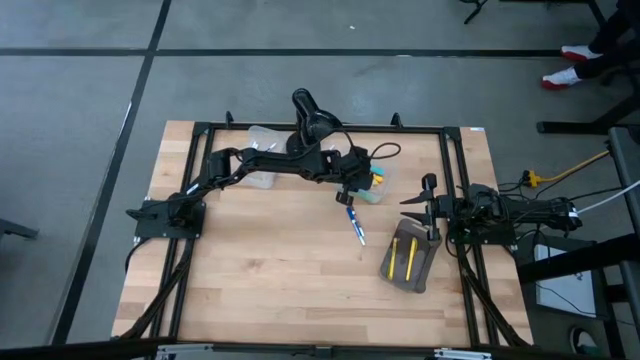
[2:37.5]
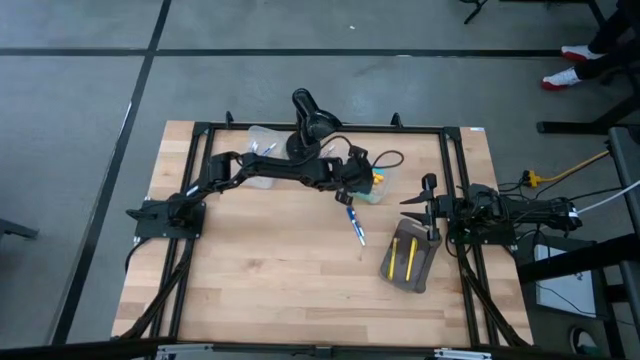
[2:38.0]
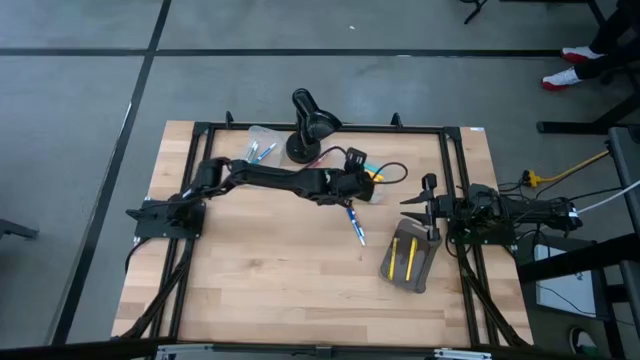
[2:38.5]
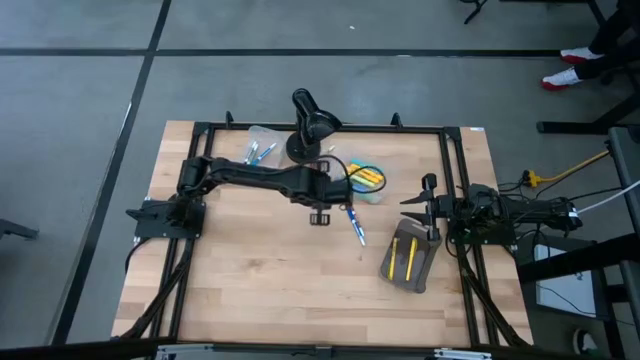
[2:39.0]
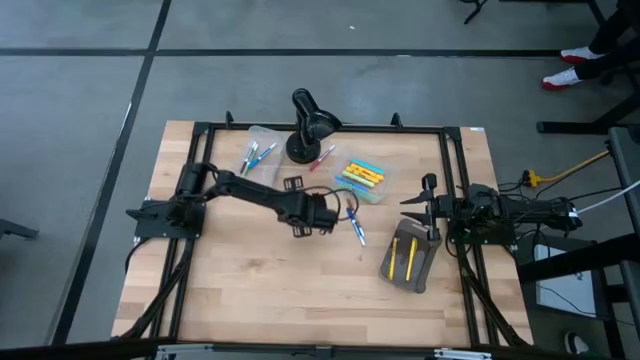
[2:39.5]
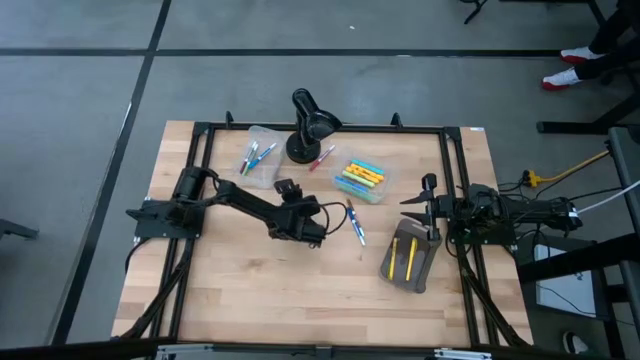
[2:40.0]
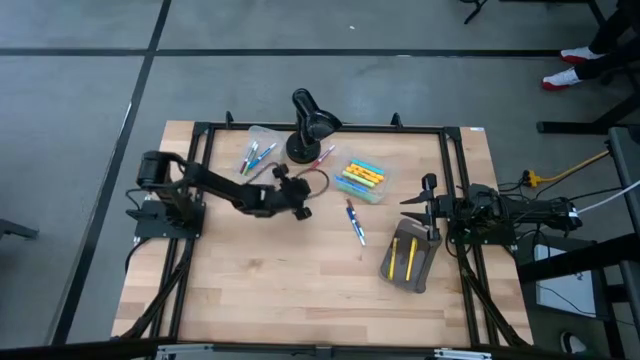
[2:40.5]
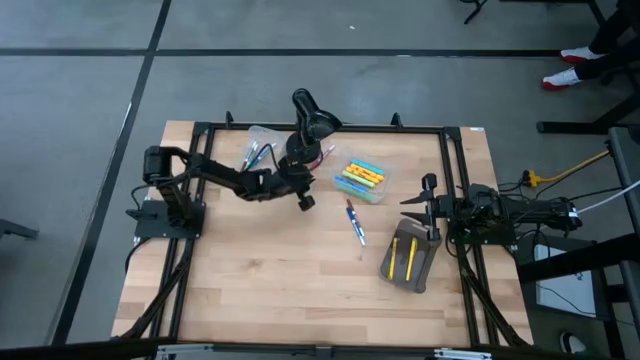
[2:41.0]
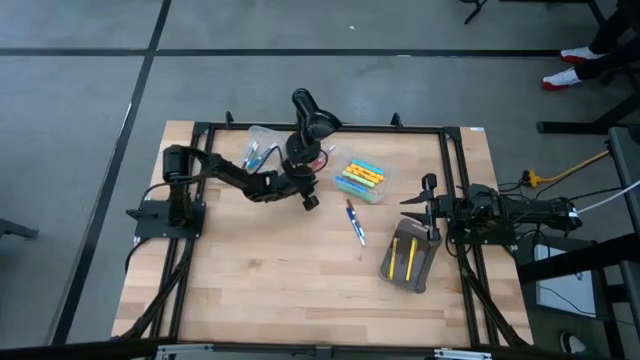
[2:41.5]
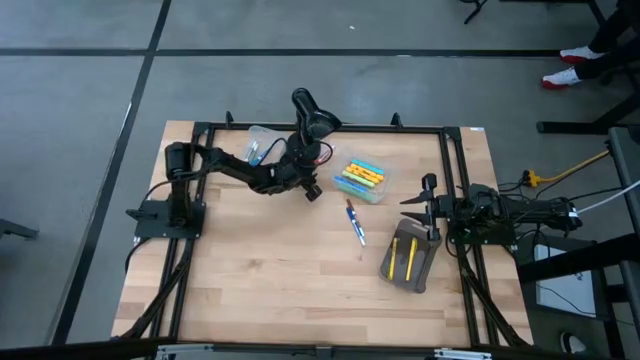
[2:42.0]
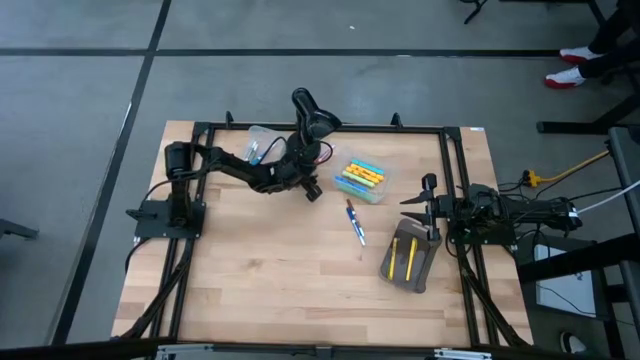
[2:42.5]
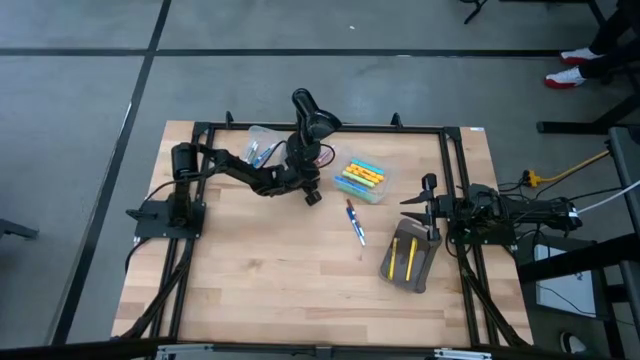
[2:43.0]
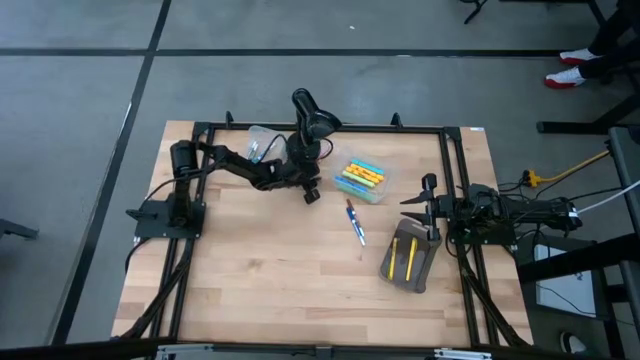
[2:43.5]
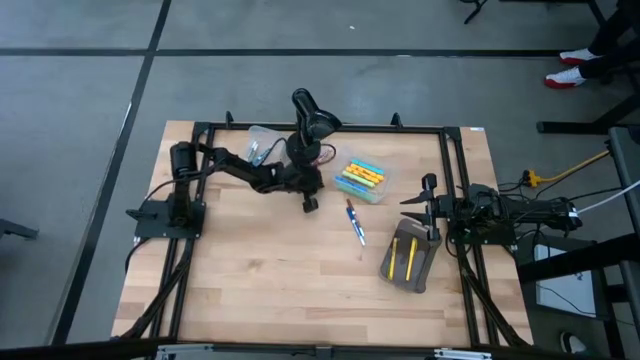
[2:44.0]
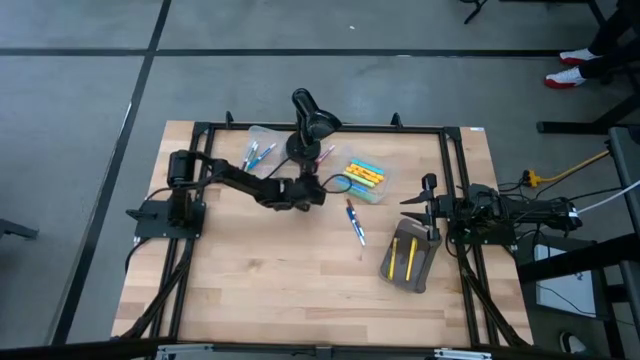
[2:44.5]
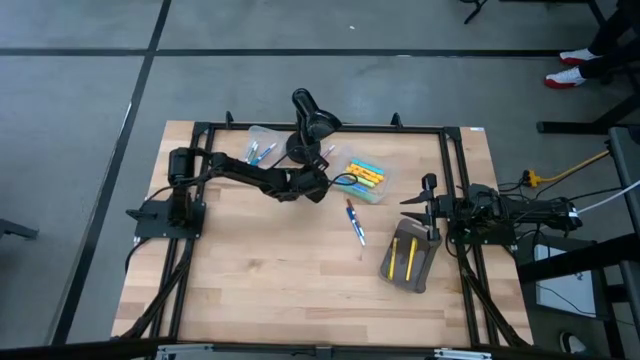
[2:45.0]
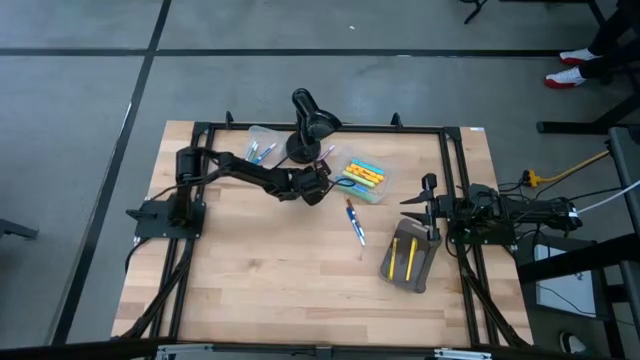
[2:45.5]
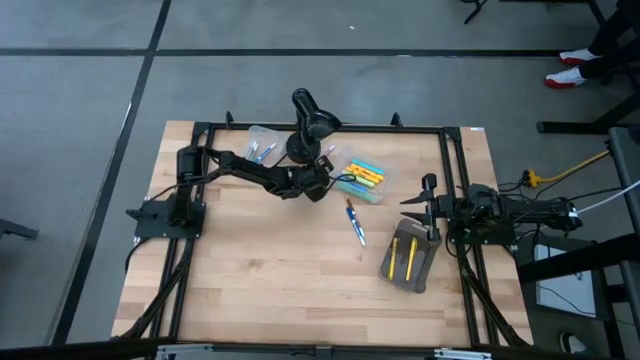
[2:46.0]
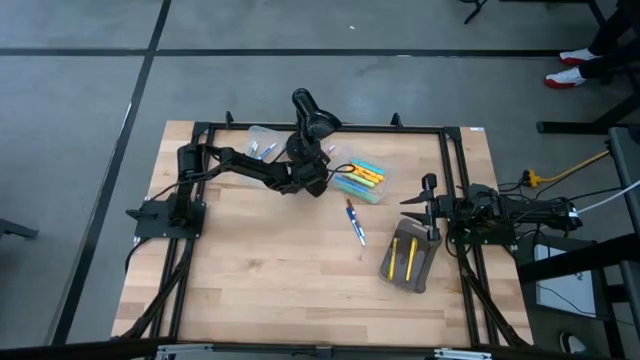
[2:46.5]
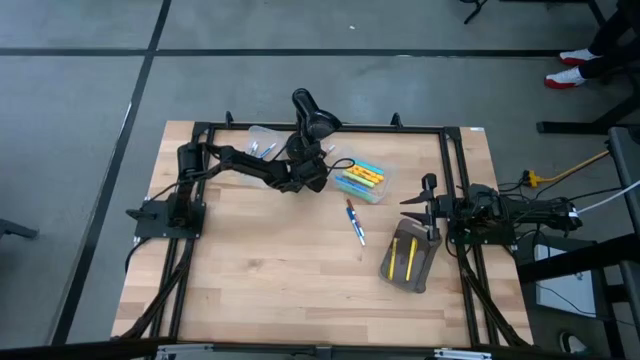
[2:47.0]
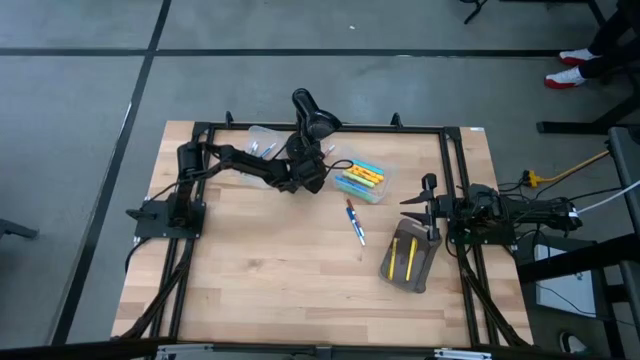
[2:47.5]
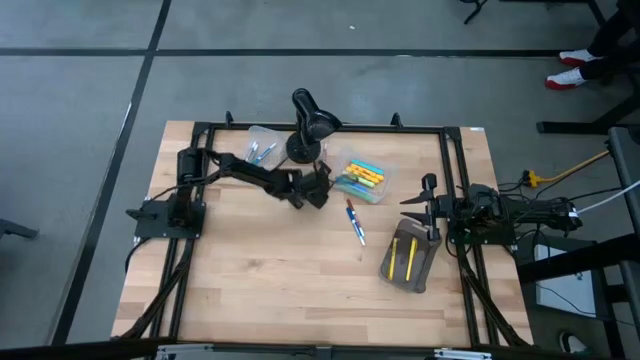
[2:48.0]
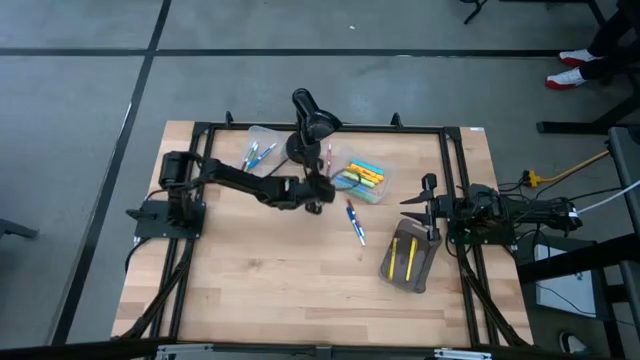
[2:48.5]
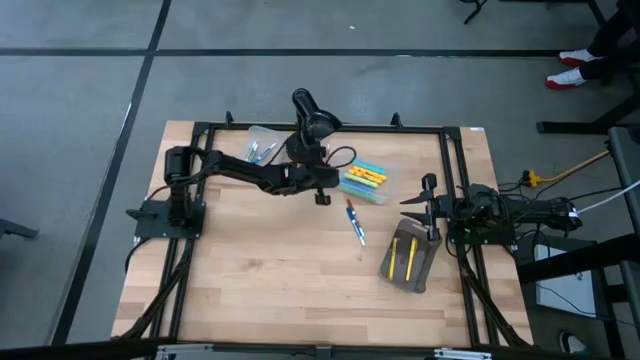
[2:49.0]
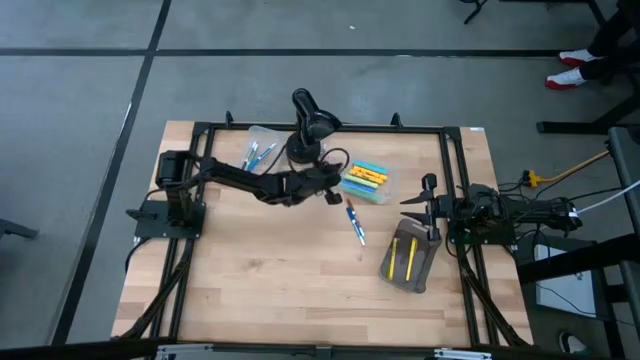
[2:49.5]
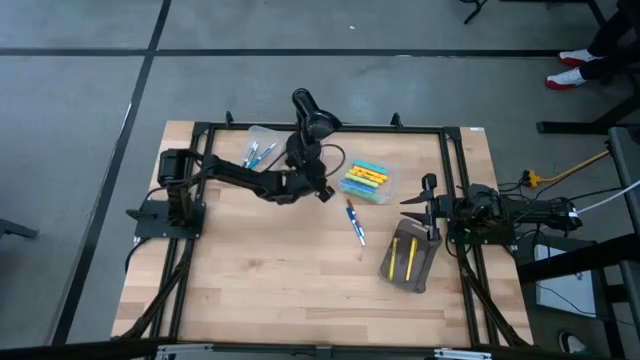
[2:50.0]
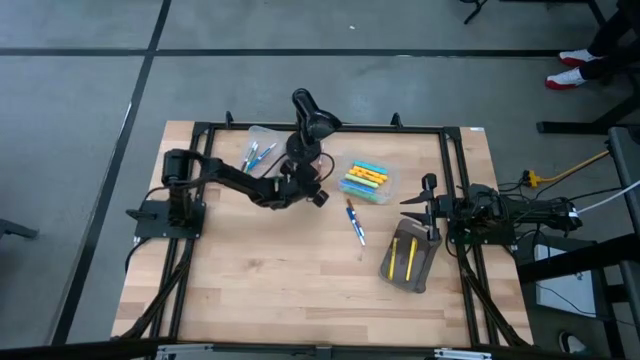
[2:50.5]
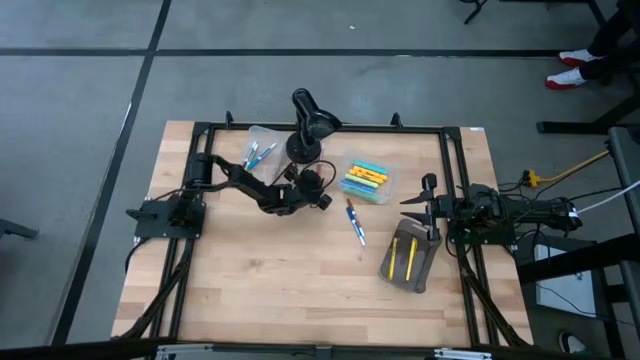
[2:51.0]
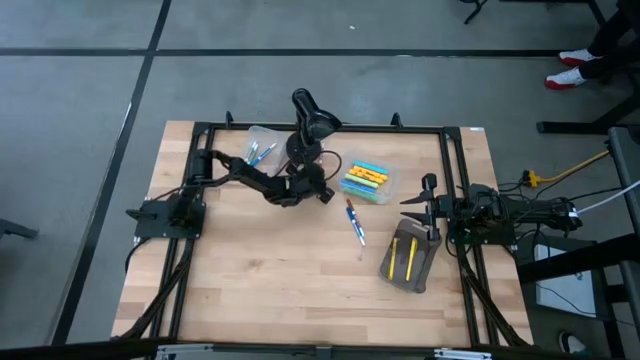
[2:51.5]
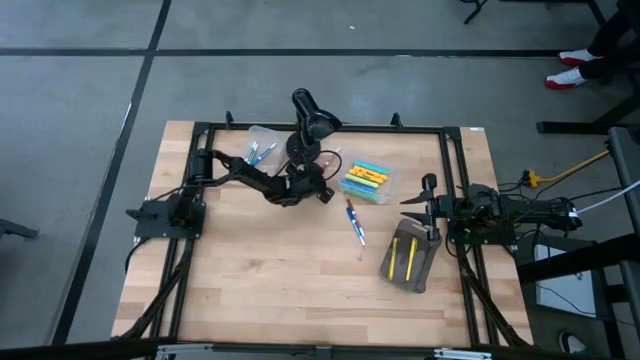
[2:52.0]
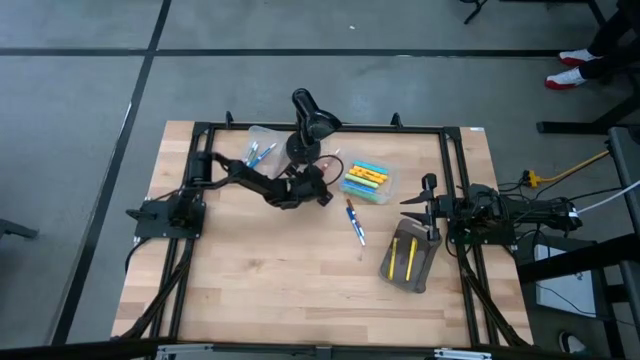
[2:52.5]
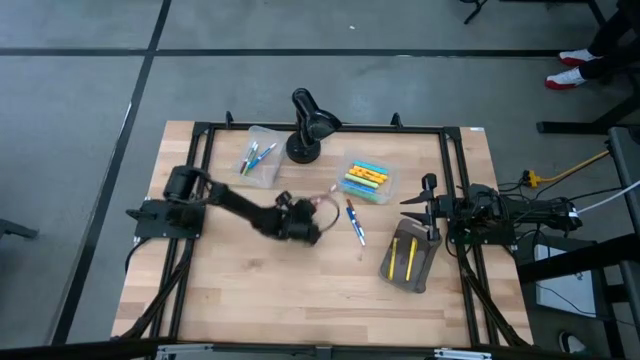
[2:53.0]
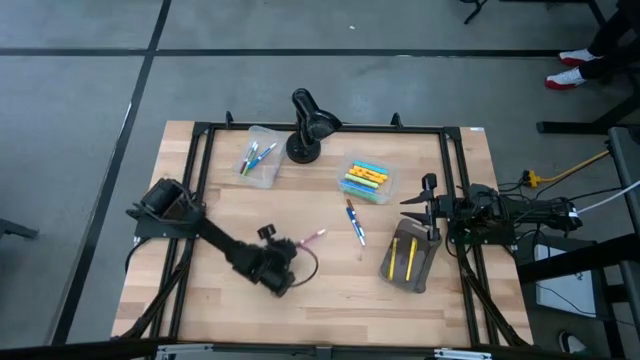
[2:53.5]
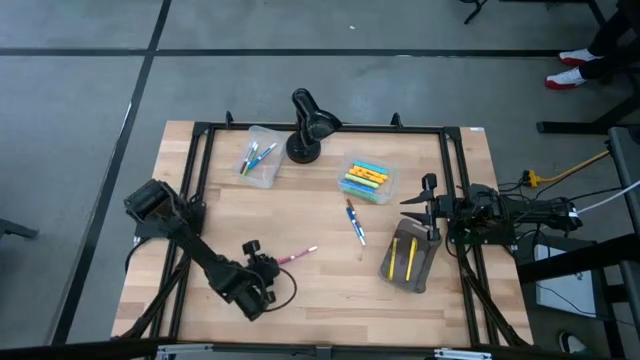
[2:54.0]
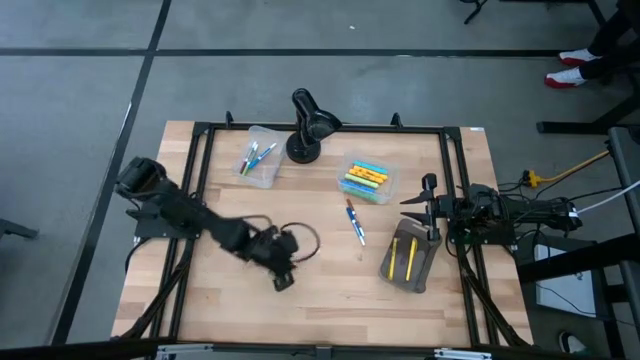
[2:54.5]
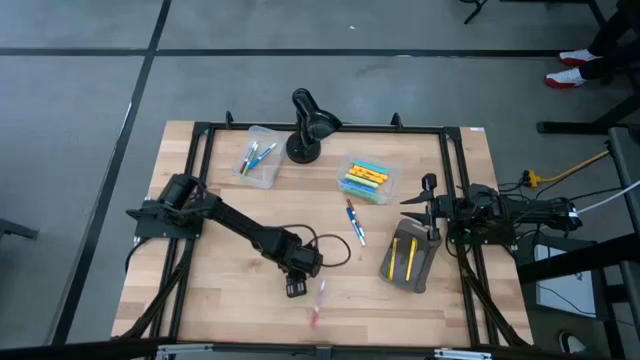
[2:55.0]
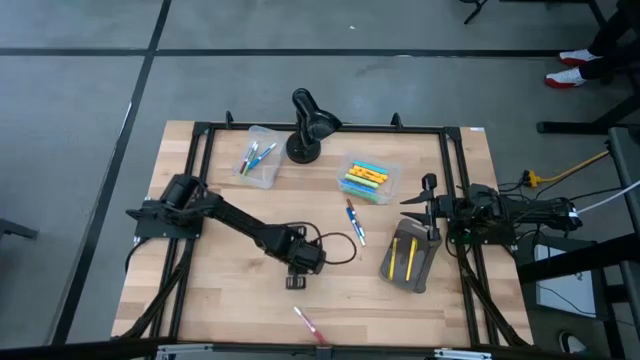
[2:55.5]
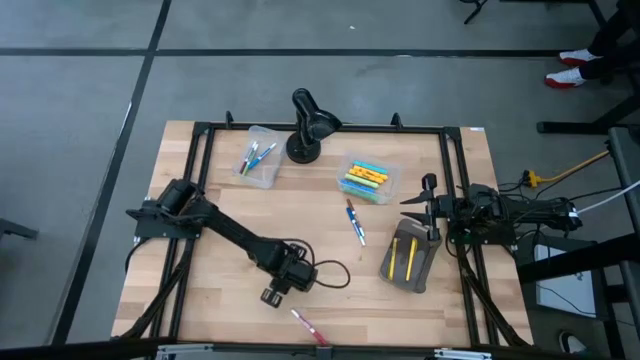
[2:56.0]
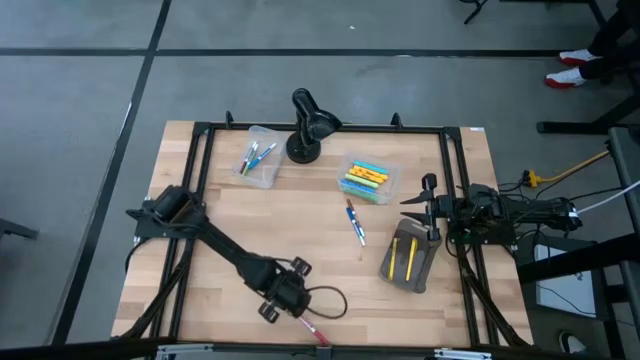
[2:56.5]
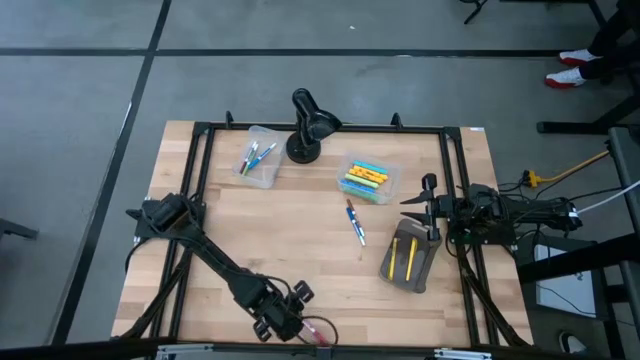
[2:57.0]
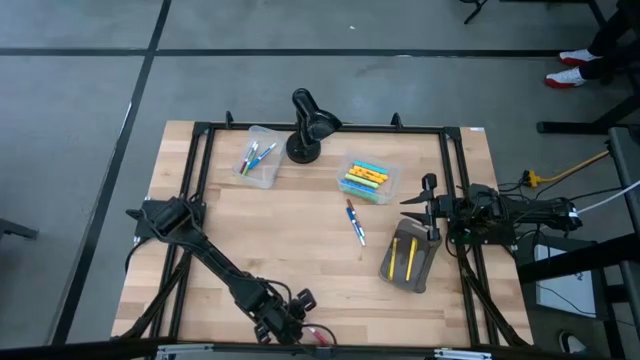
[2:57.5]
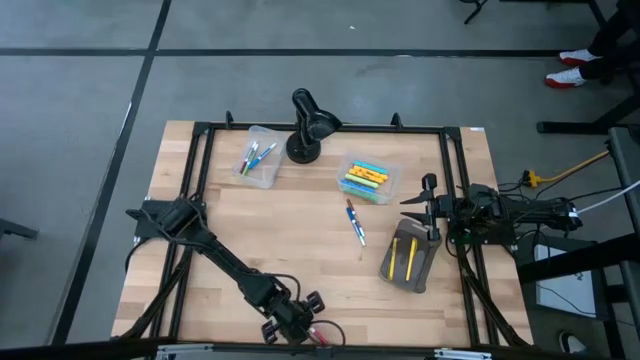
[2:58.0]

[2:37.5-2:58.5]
Task: Pick & Place Markers
Put the pink marker pen into the left transparent bin
